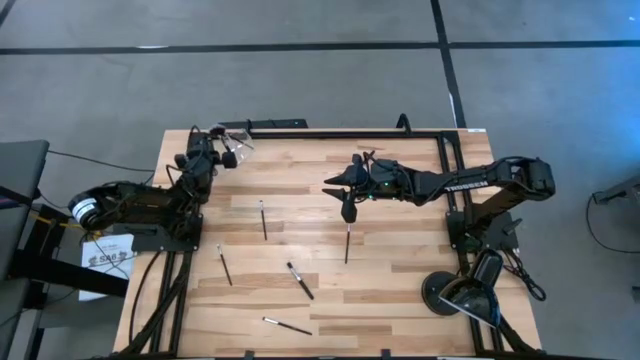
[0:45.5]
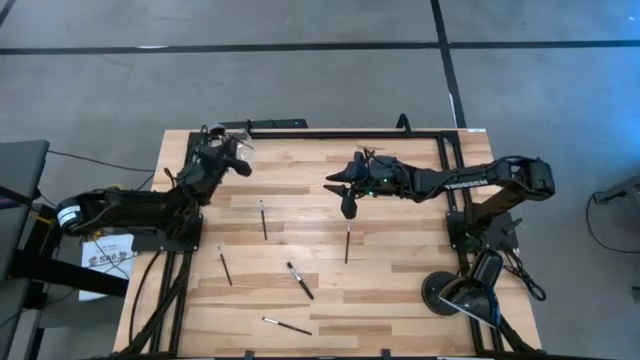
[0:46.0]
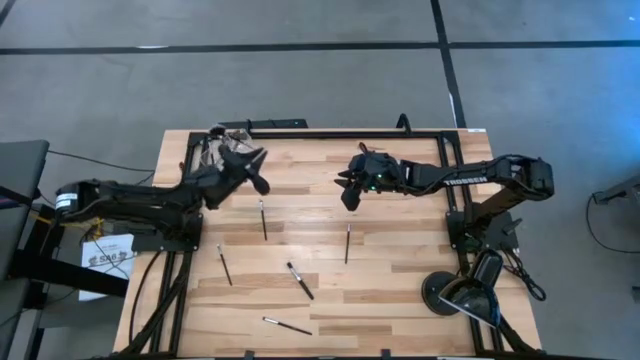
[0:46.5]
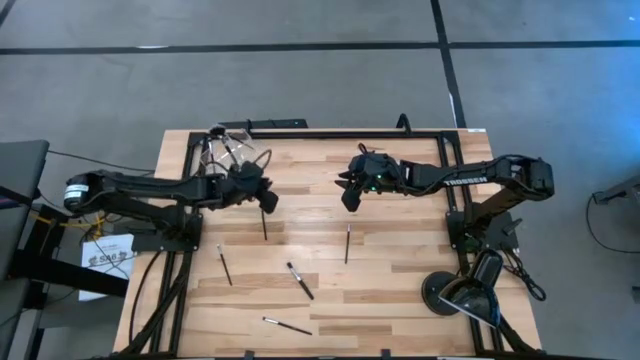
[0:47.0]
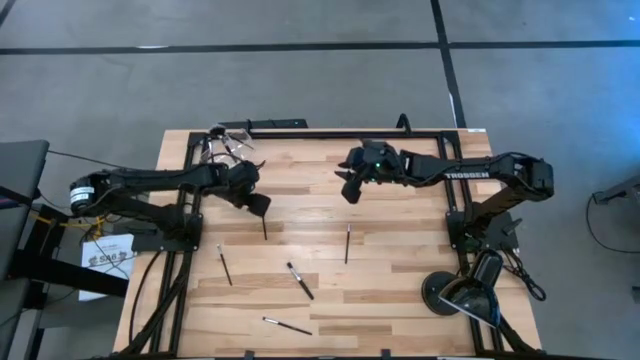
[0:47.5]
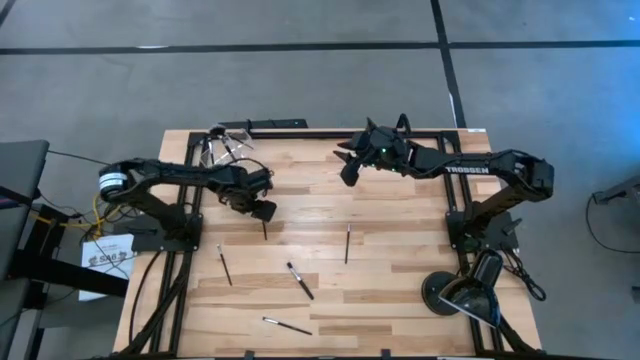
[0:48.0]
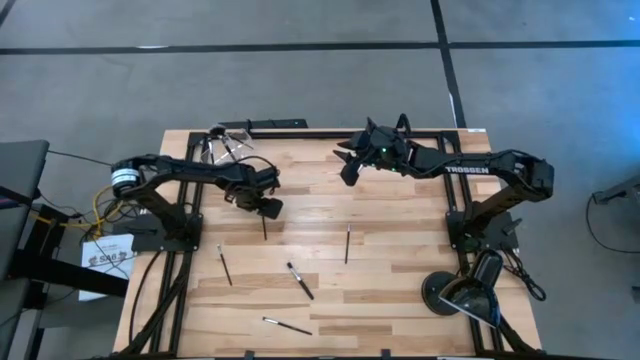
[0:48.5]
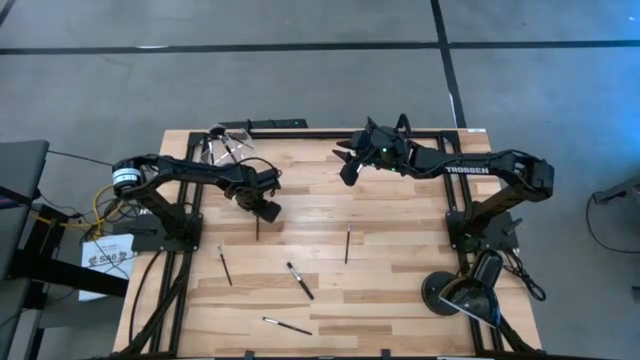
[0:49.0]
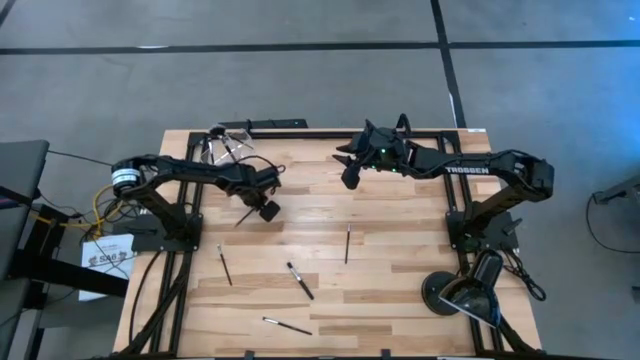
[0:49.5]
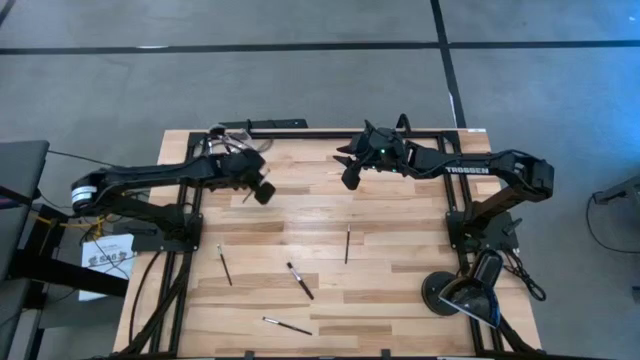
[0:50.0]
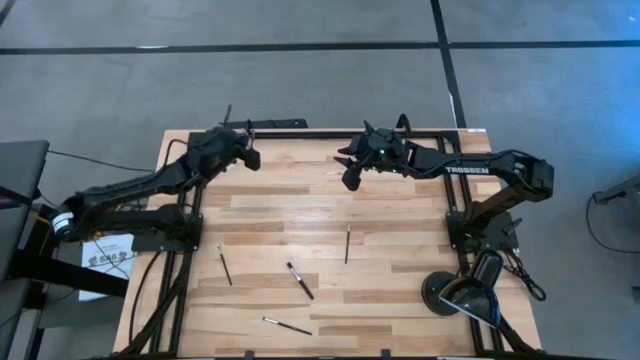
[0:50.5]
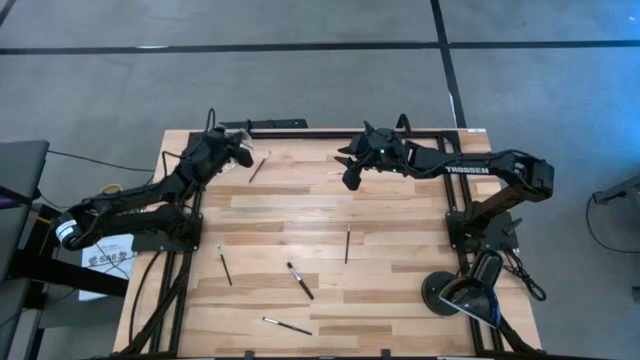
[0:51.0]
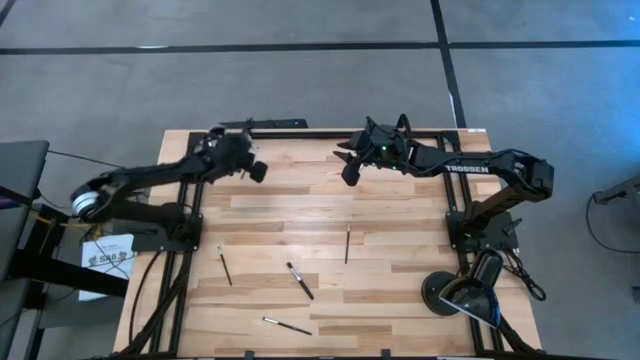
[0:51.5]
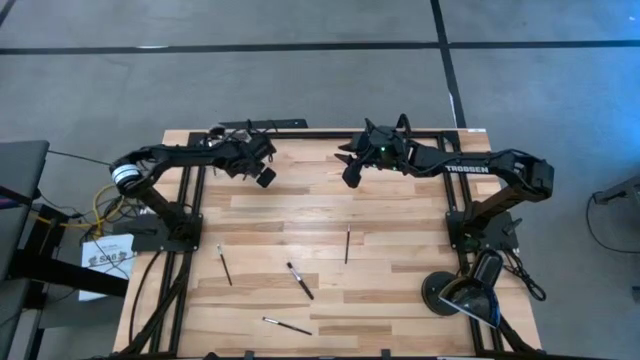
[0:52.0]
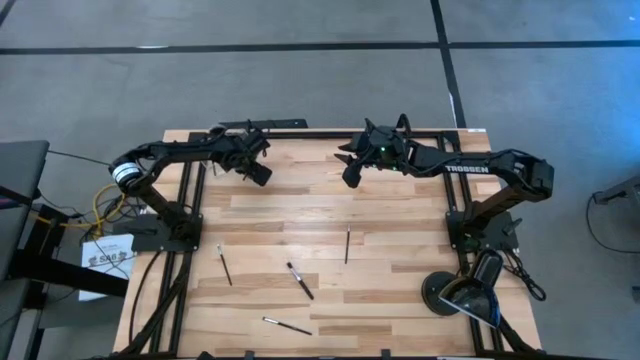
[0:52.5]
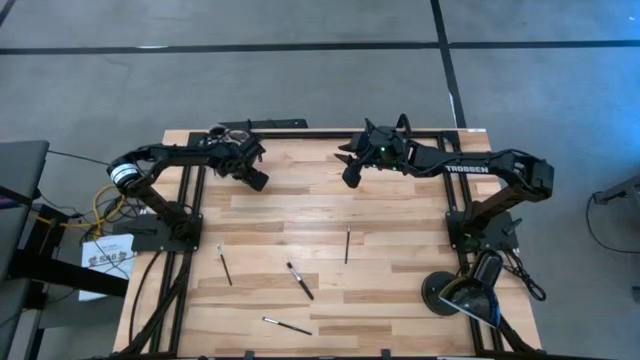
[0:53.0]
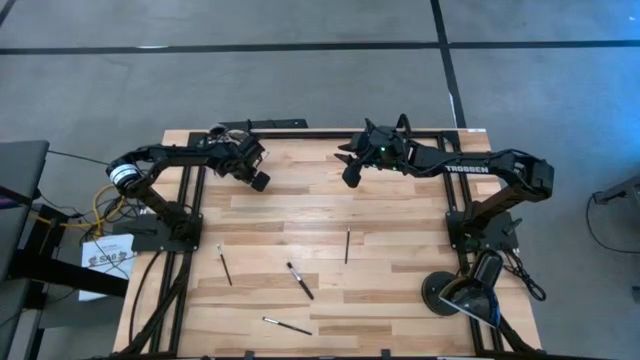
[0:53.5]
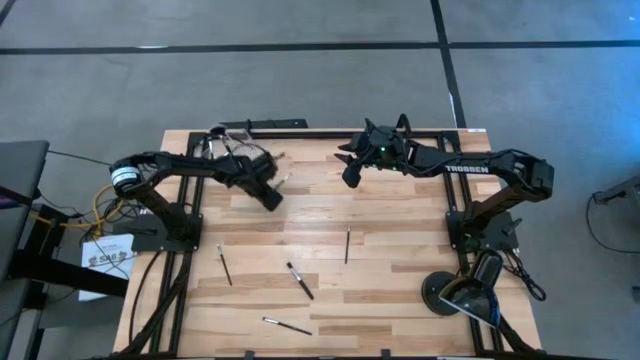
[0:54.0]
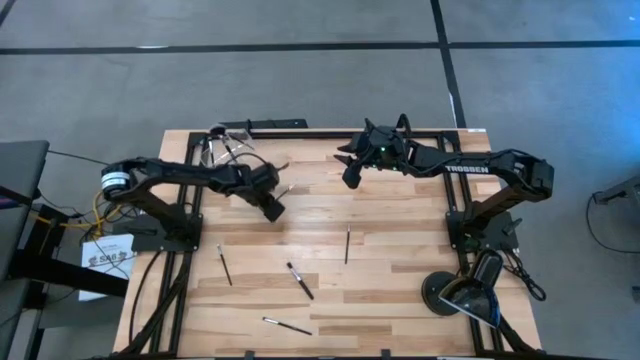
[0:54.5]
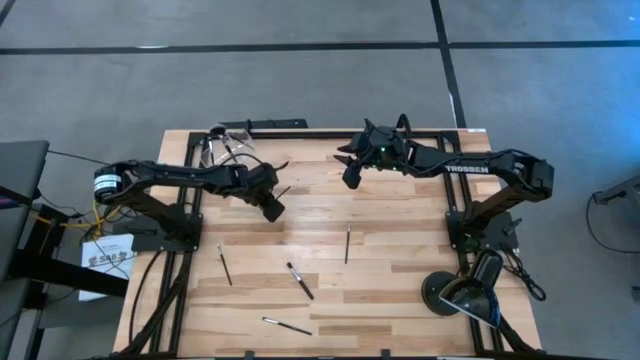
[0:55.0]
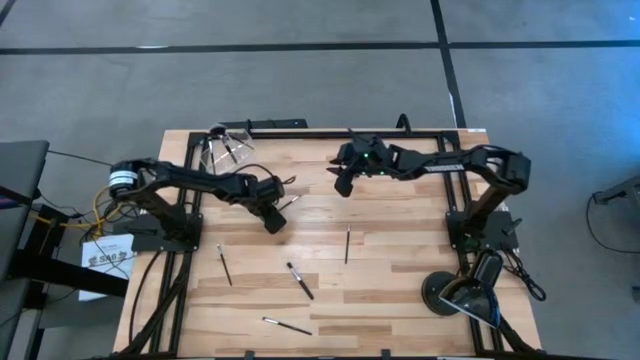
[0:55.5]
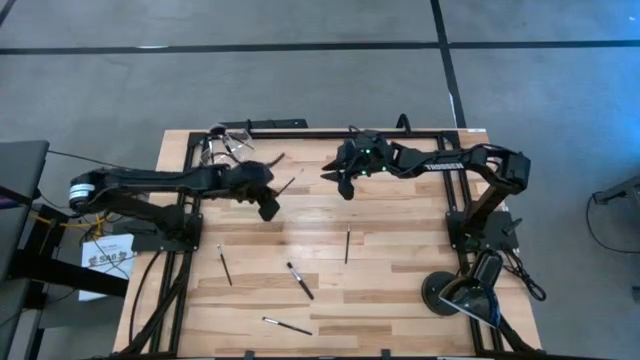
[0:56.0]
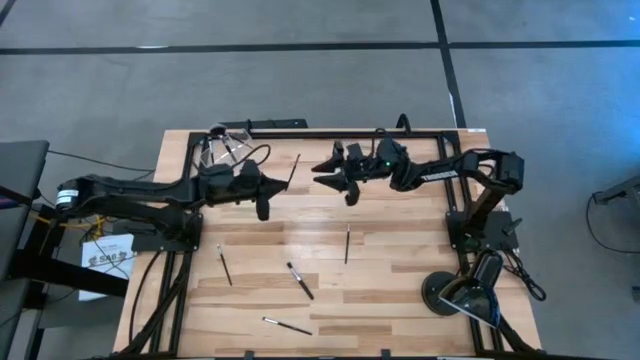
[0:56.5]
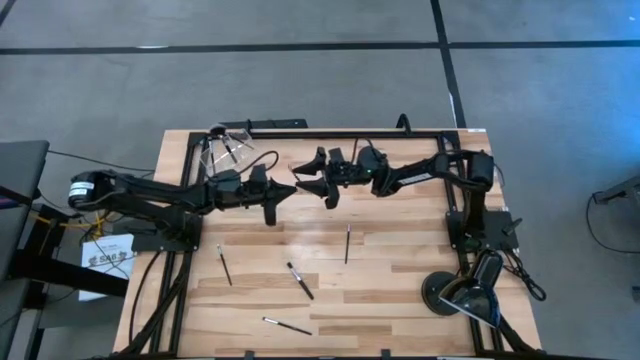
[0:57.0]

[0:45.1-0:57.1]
Task: Put items in baskets/containers
Put the eyeshadow brush into the transparent bin

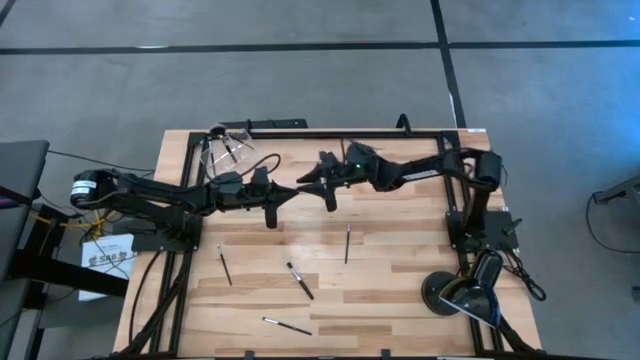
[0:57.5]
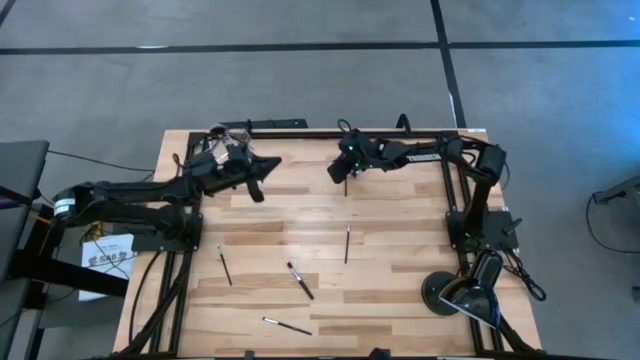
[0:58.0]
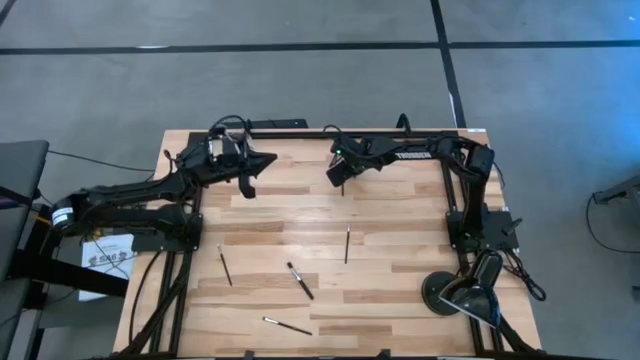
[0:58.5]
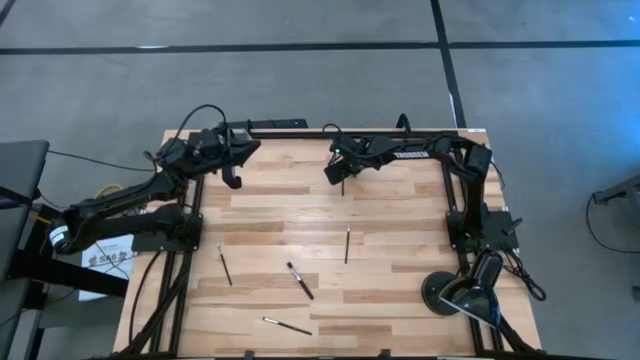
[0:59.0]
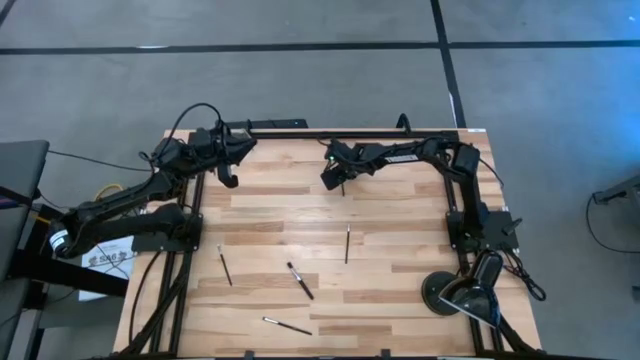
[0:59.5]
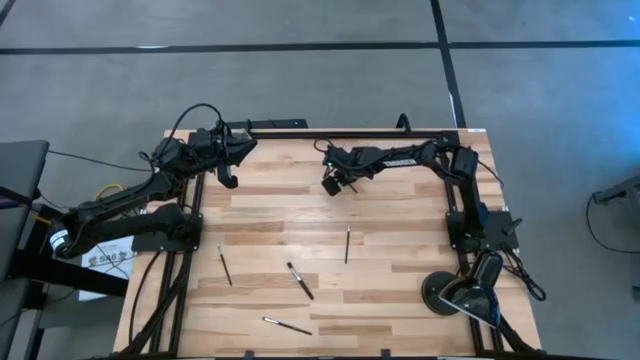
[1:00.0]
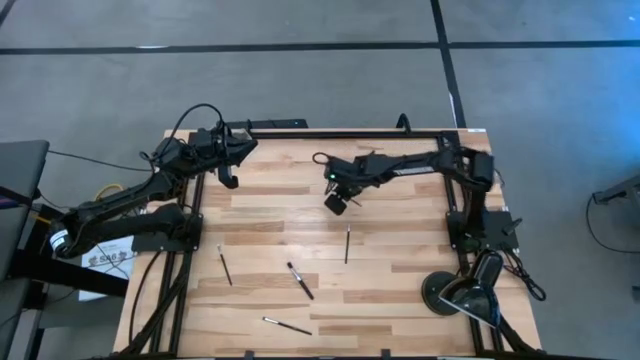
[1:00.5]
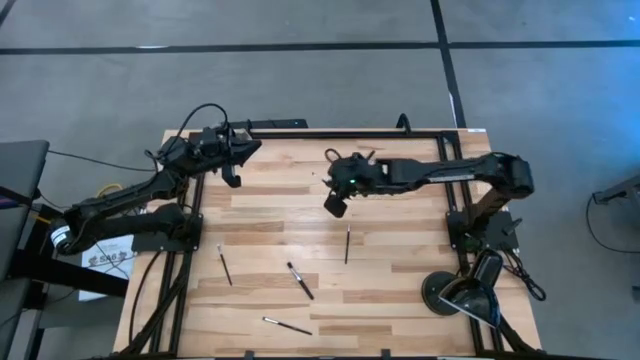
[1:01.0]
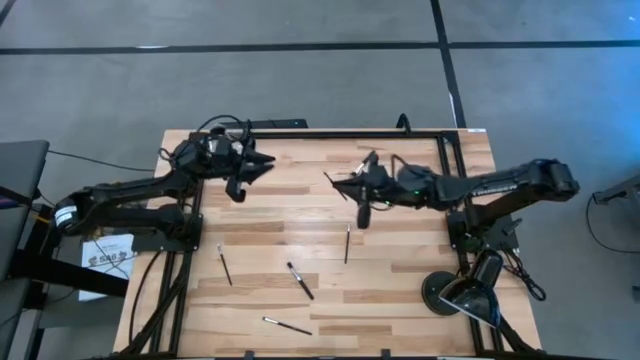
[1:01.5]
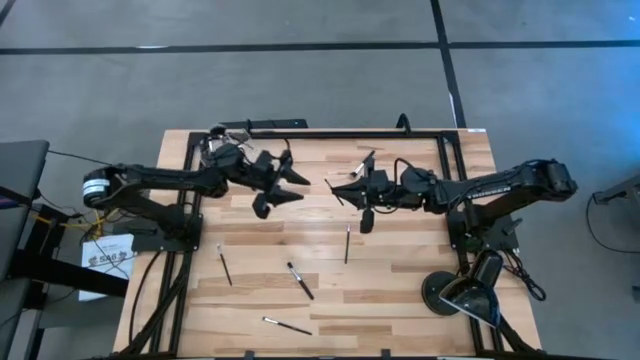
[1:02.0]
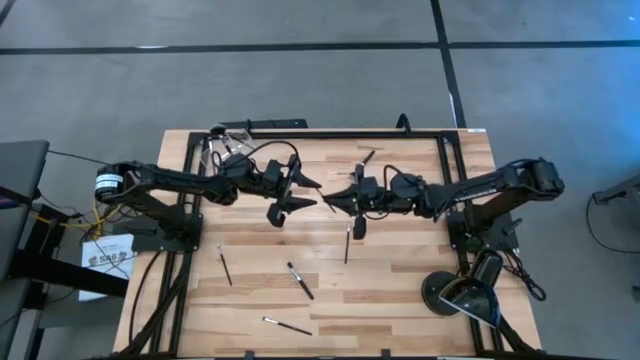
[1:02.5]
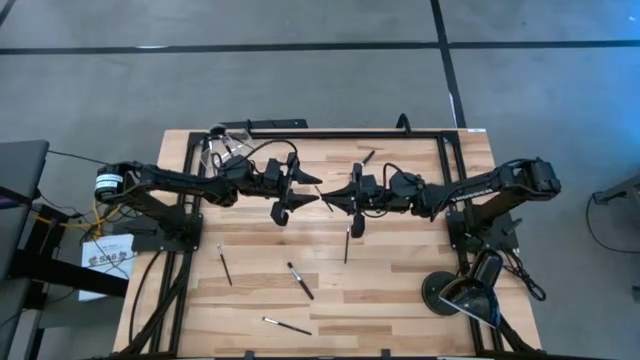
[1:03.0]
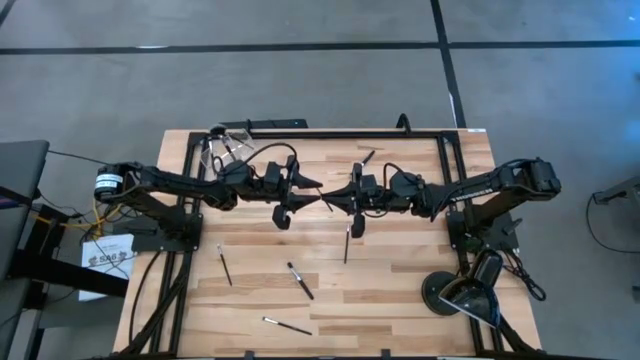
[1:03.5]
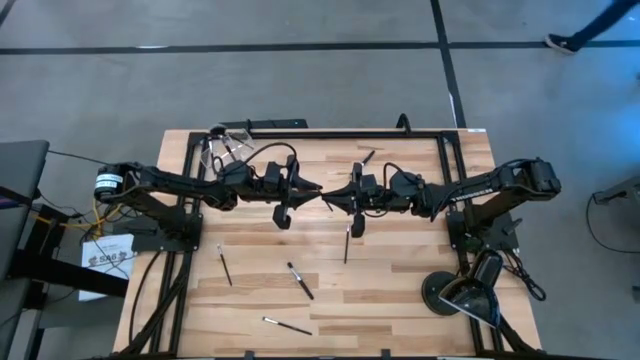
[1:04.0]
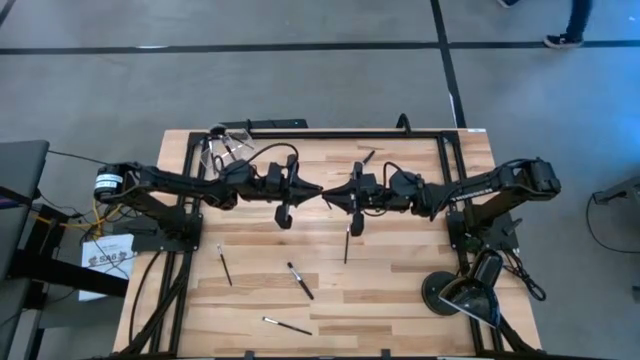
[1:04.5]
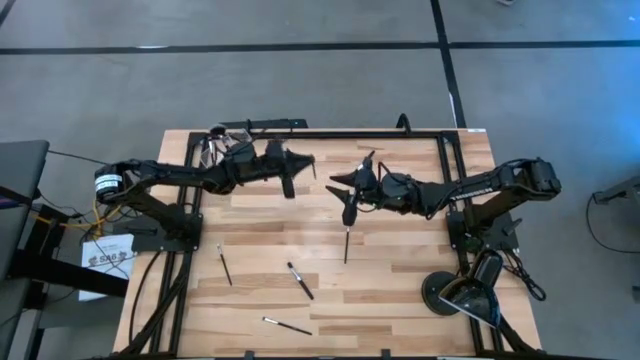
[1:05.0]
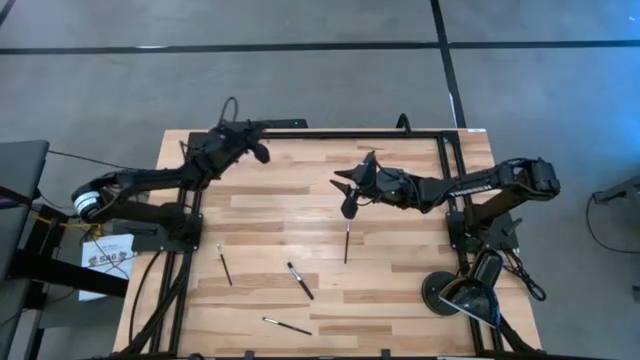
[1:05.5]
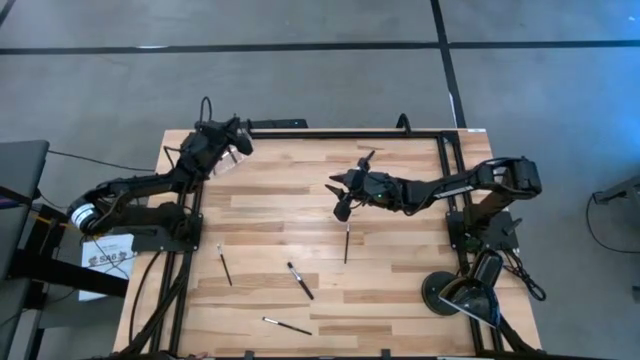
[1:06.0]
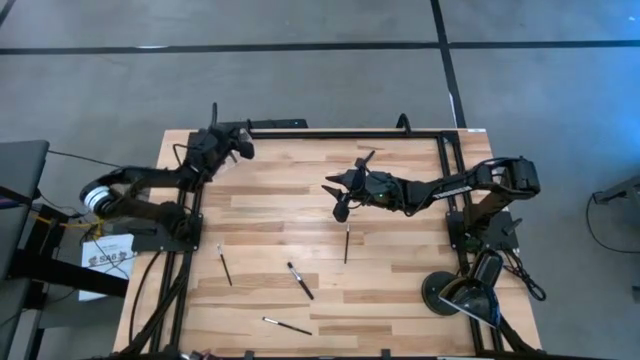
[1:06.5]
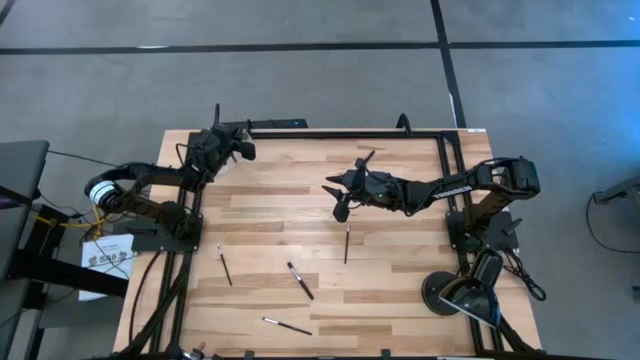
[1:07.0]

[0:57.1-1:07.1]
Put the eyeshadow brush into the transparent bin

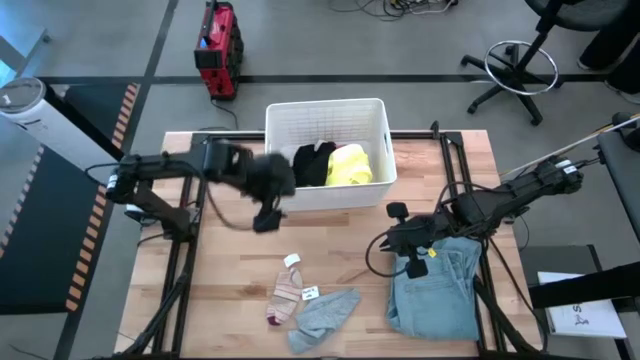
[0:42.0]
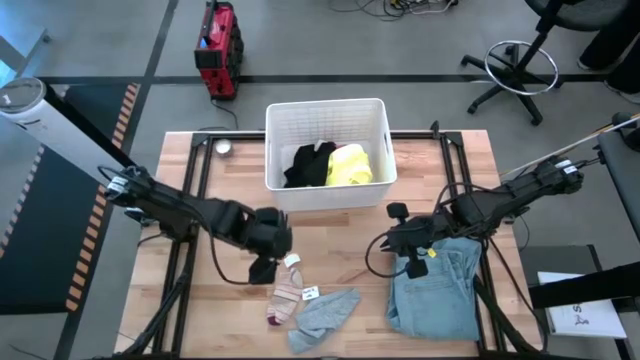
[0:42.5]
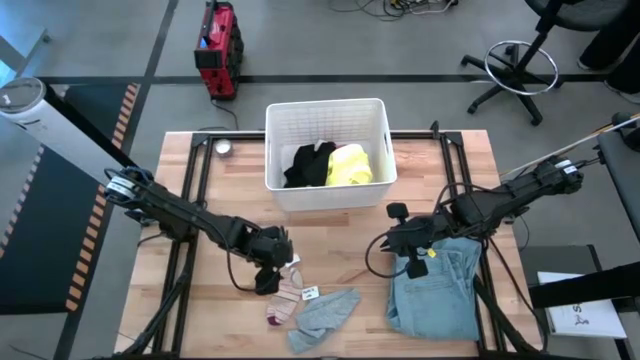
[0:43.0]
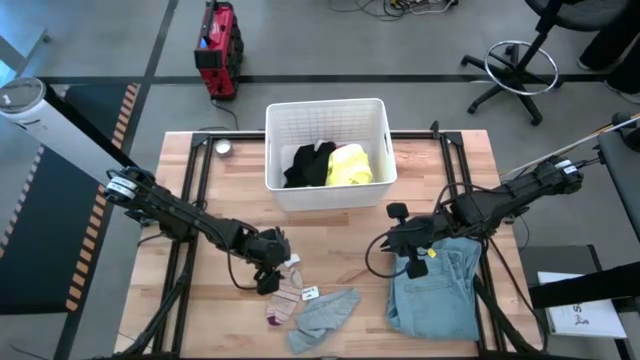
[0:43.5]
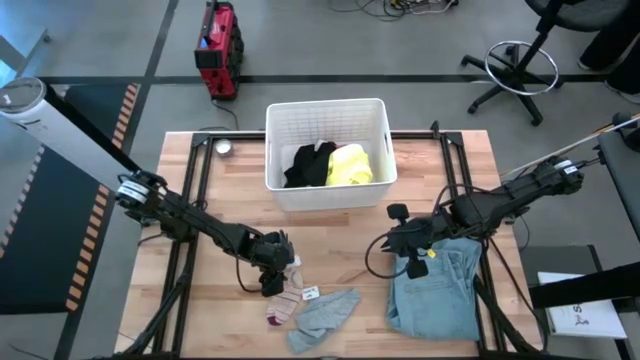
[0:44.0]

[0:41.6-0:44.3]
Task: Sort clothes
Put the striped sock into the white laundry bin
